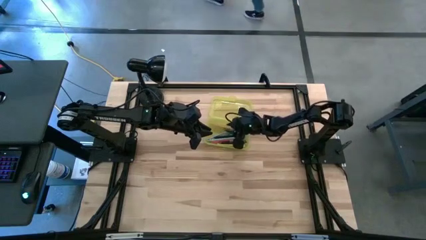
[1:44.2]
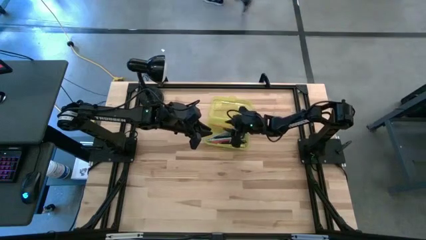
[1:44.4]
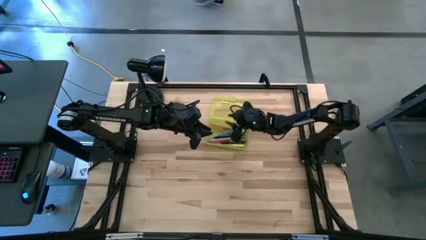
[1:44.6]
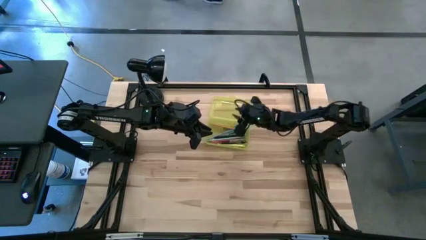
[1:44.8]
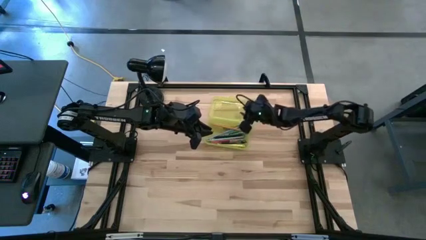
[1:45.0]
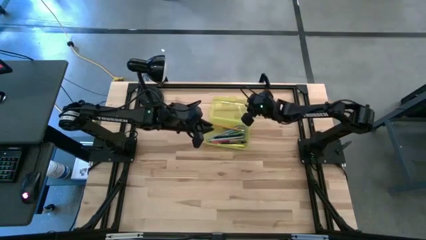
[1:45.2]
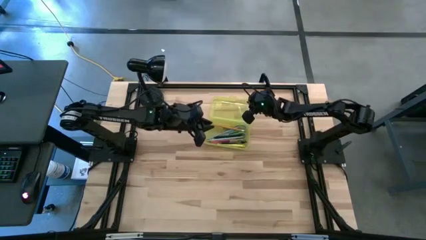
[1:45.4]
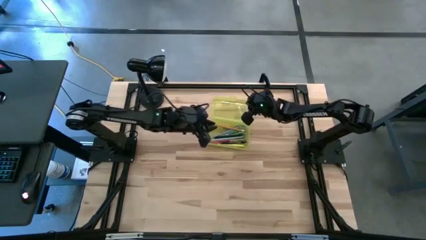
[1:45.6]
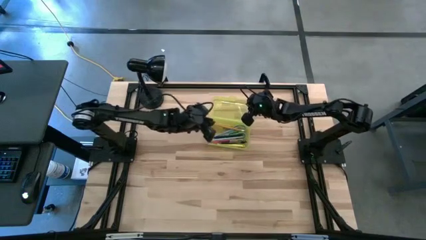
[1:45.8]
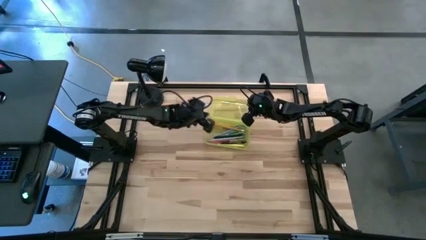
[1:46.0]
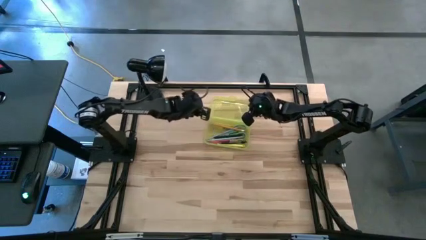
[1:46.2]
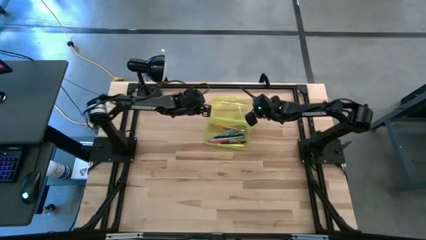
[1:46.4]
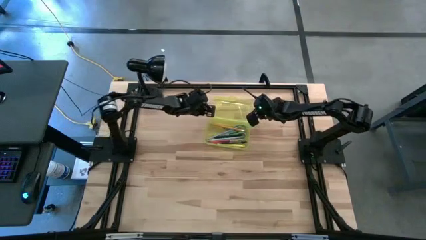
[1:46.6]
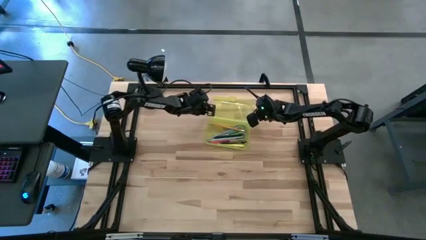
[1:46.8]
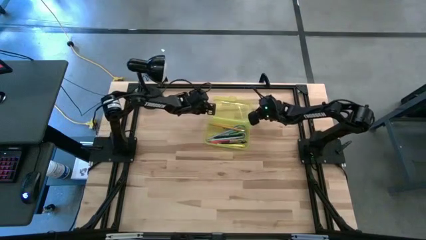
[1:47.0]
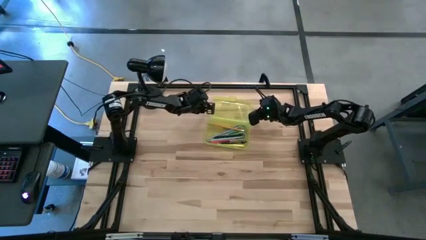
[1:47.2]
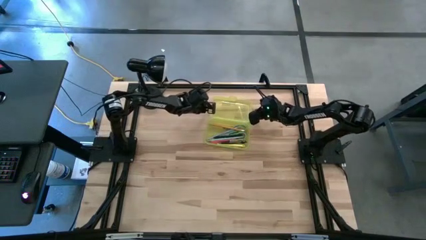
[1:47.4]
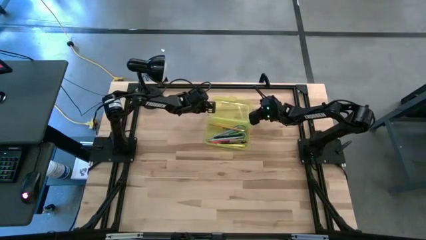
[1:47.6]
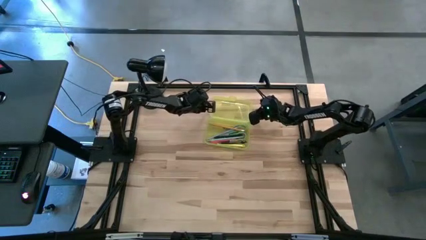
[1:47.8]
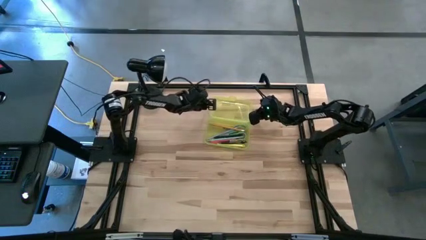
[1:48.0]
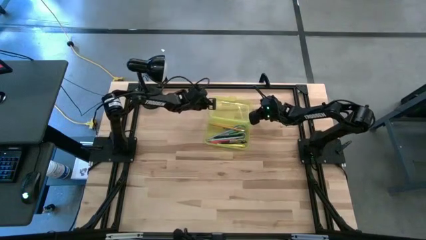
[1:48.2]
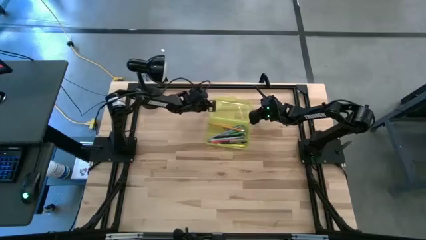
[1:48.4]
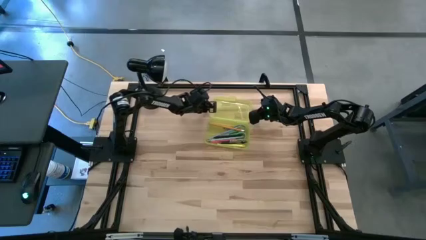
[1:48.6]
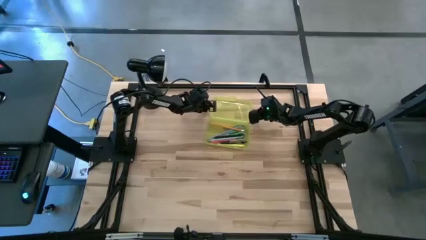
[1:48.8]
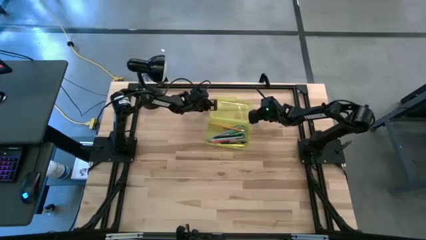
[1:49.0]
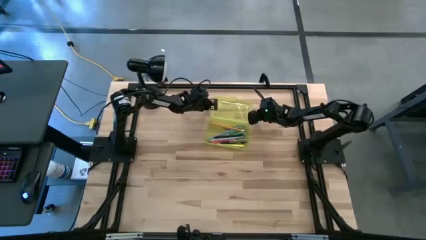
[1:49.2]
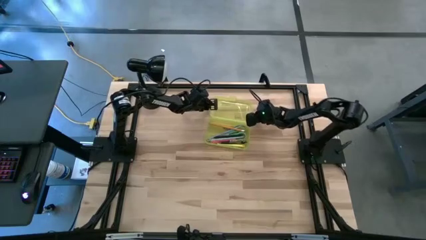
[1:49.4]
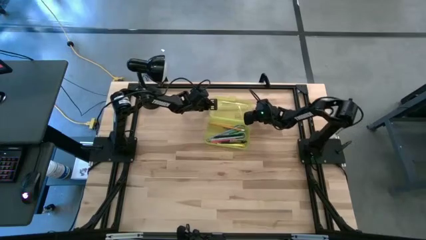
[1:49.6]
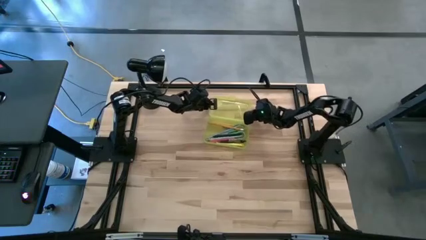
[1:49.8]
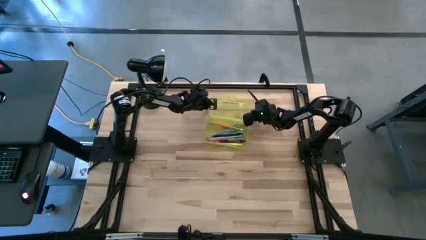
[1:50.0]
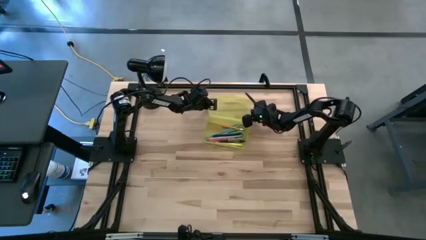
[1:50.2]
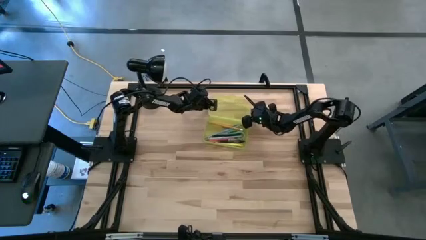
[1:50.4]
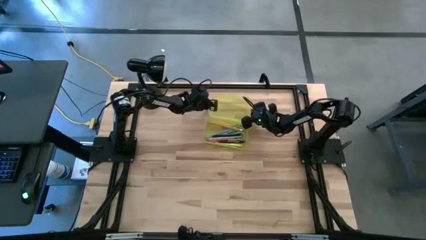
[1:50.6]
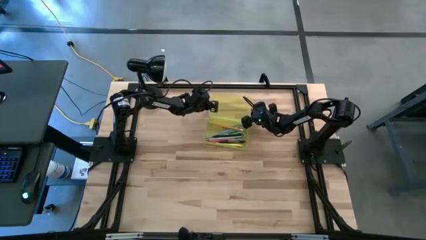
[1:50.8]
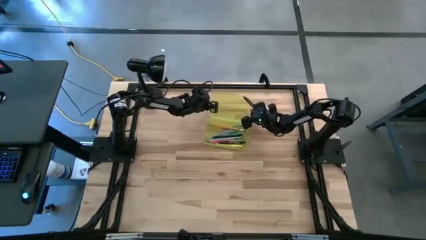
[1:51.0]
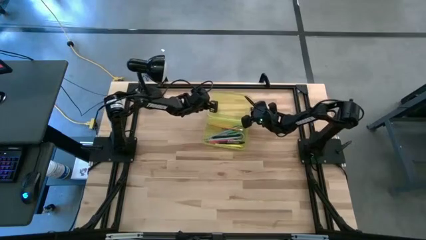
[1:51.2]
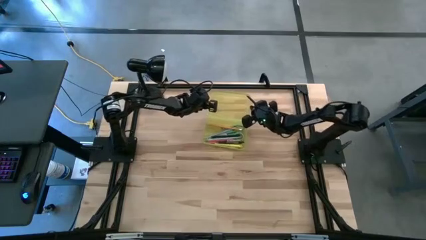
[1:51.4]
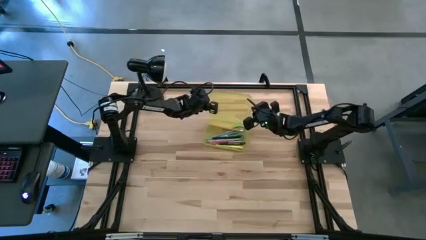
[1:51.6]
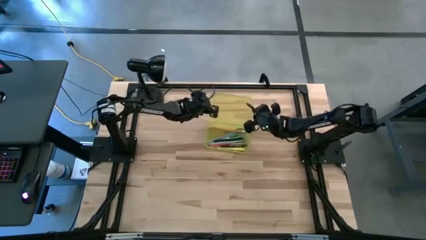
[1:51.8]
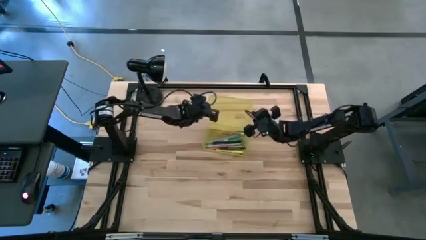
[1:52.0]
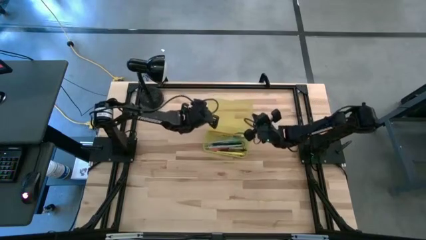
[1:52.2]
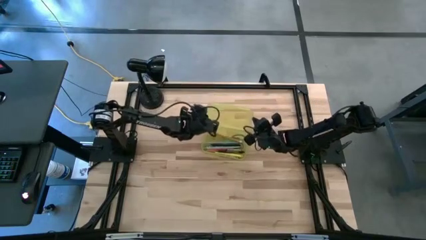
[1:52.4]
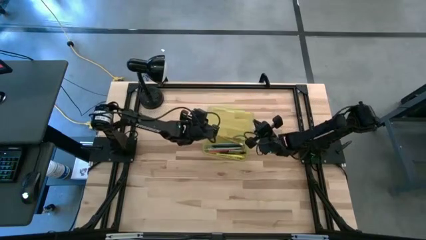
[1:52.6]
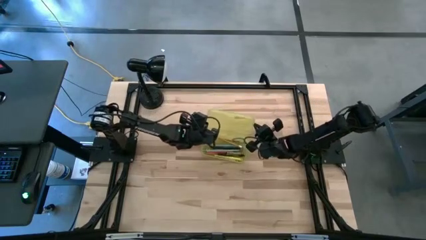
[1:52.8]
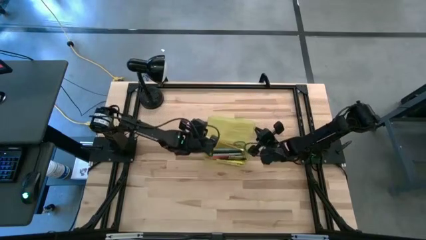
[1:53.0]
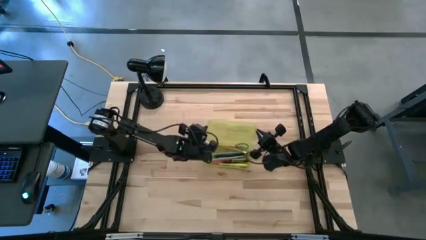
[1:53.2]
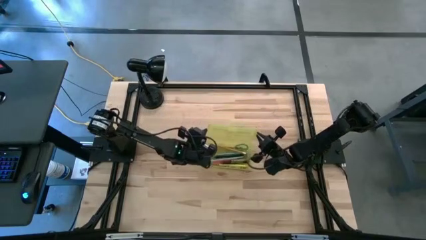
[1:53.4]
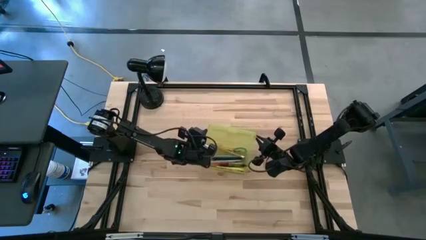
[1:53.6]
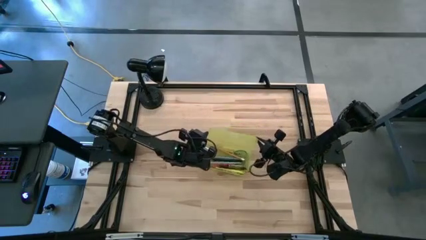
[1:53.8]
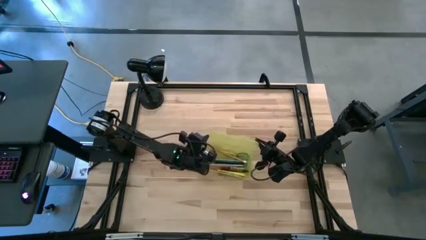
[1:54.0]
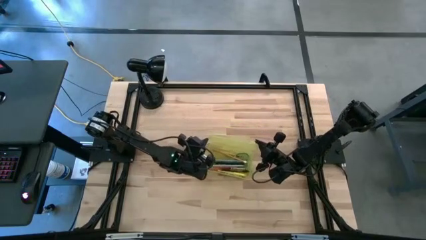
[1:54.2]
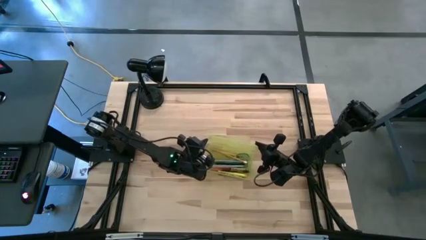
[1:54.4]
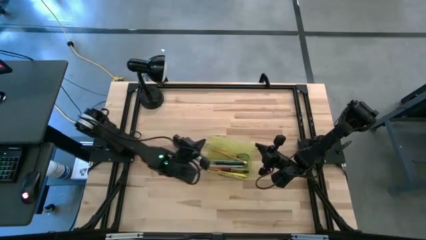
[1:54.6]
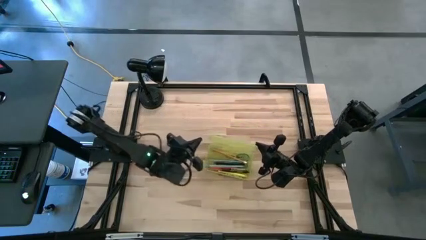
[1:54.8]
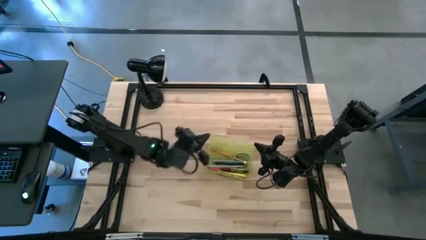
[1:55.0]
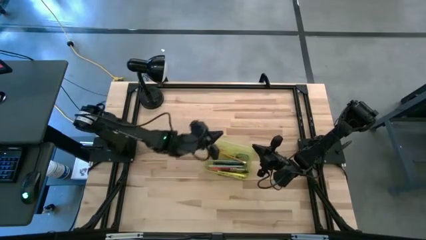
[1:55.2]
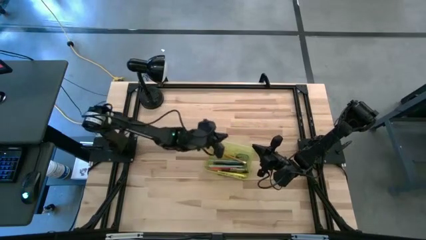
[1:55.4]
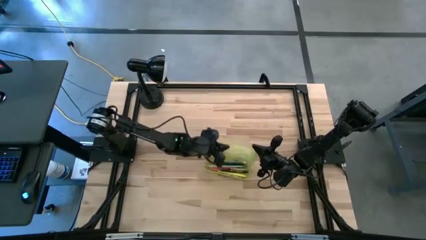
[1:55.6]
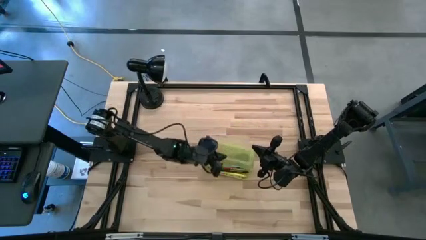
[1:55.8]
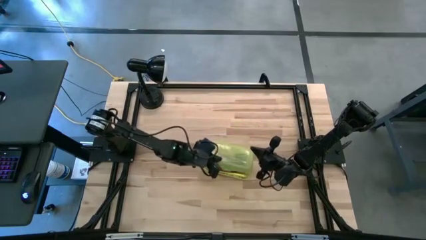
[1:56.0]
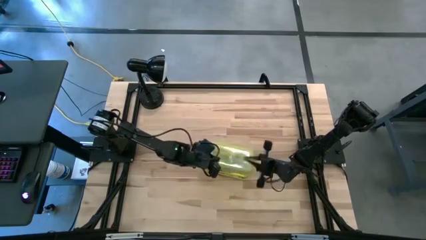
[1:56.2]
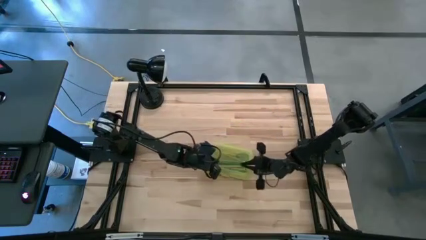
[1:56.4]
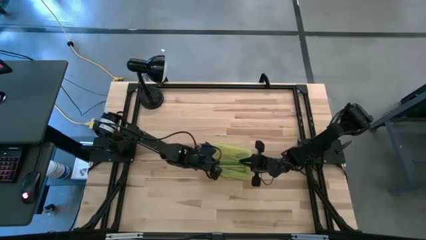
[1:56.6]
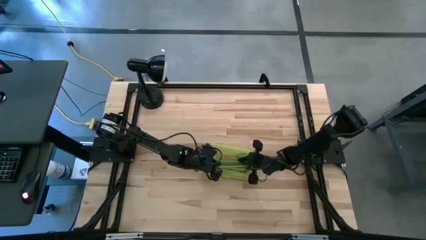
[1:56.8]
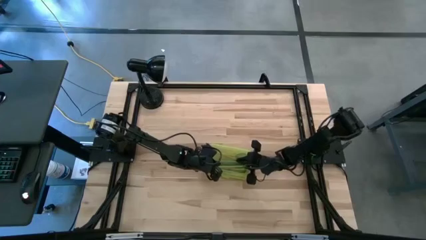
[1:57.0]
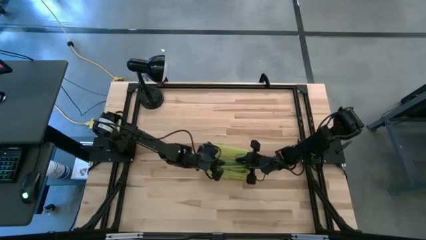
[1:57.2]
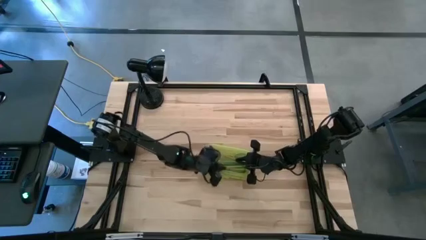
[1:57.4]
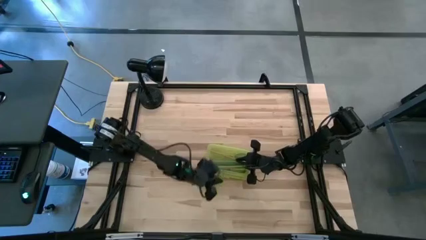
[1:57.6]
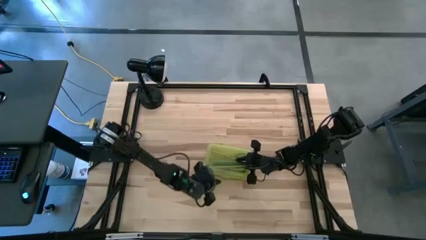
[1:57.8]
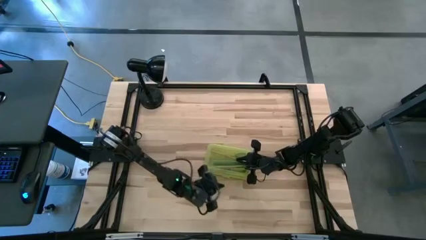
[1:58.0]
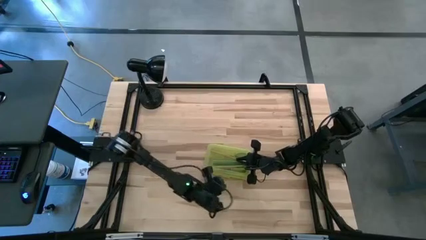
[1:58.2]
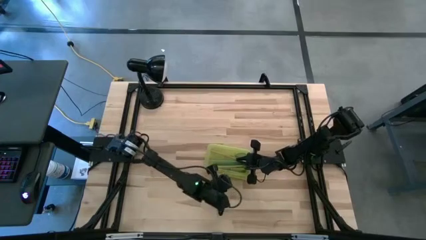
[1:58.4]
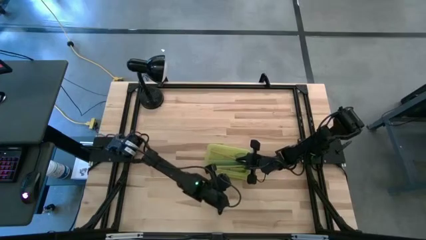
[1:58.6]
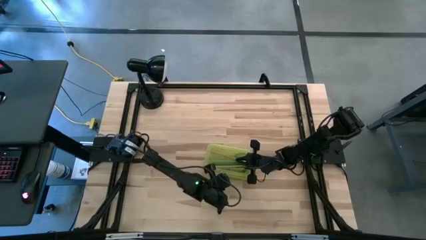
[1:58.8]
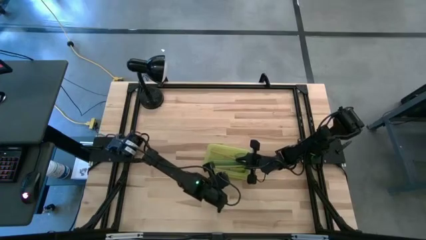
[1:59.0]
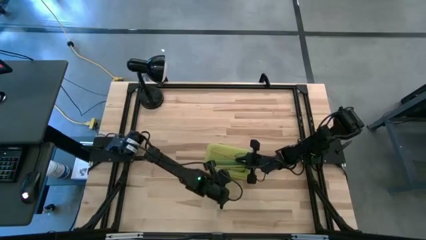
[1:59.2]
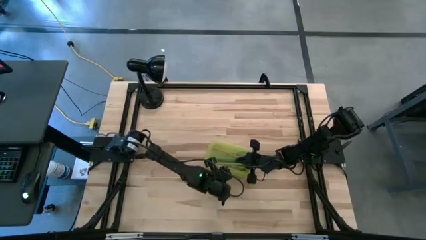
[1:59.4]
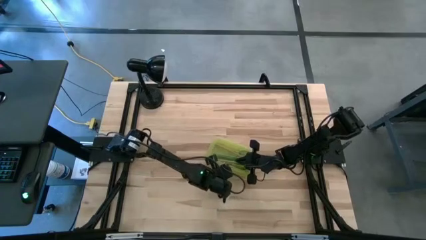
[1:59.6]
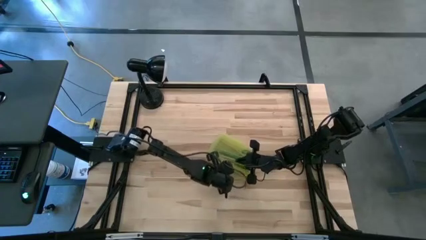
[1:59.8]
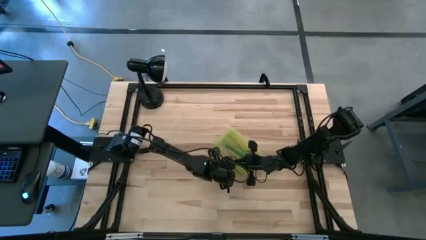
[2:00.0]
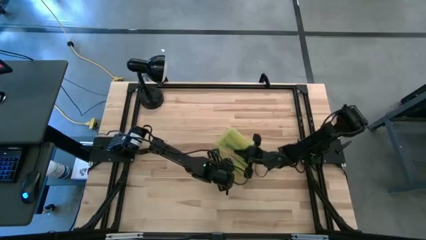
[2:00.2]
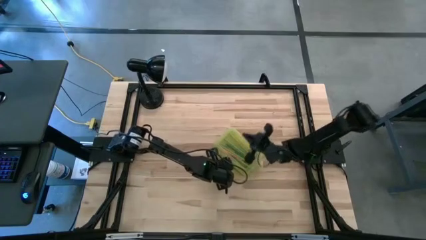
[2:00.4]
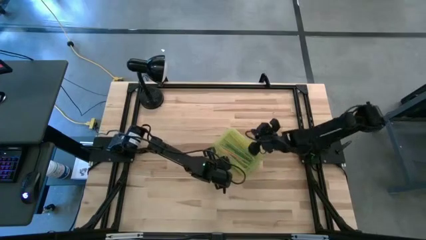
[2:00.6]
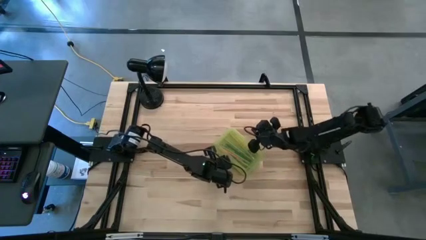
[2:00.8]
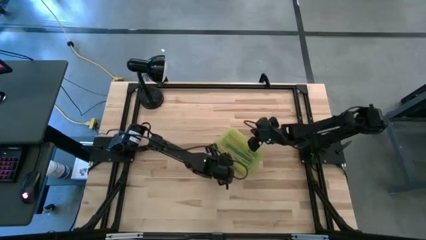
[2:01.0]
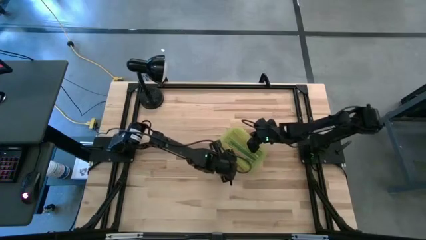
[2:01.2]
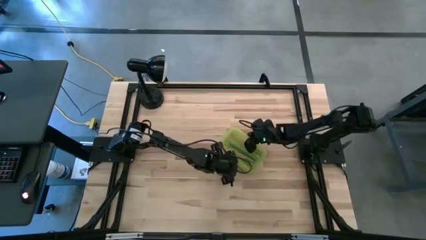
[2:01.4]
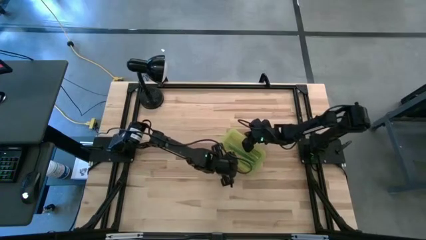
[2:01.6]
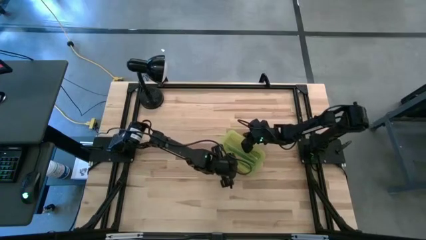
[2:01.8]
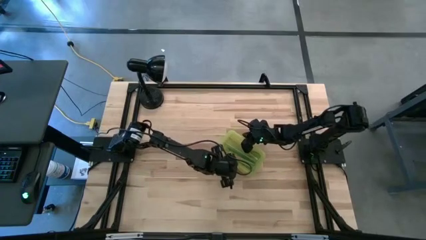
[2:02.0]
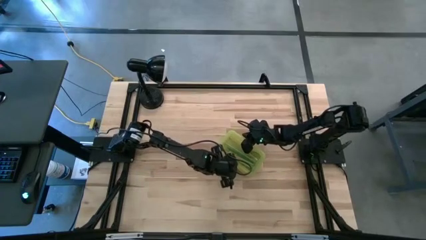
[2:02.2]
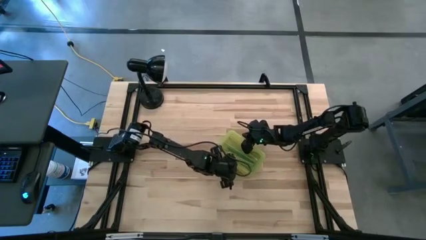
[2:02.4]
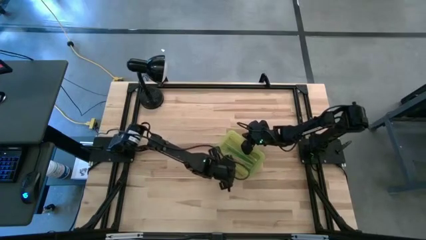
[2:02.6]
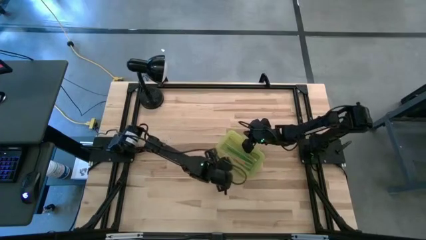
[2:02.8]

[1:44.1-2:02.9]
Task: Pick & place school supplies into a supply box
Close the yellow supply box
